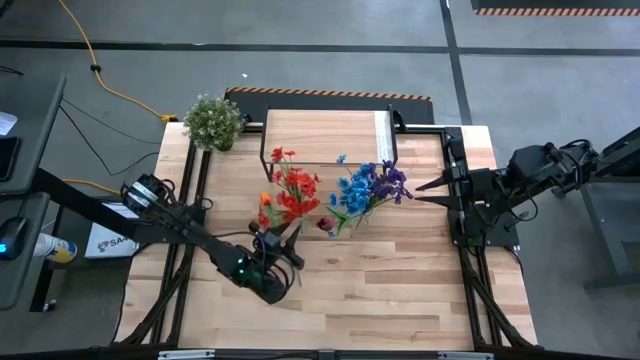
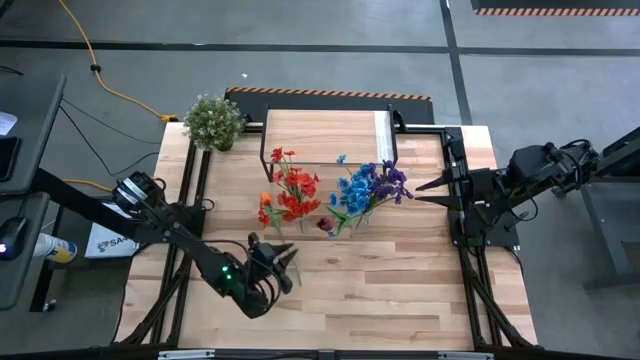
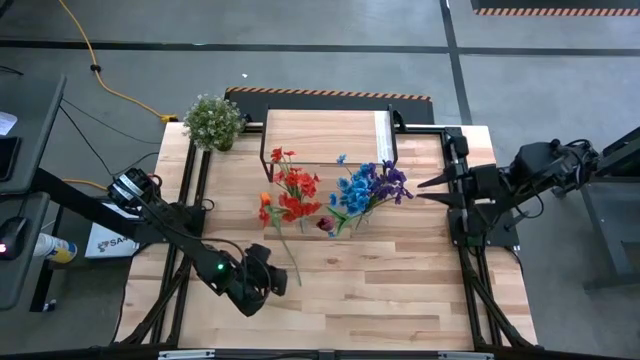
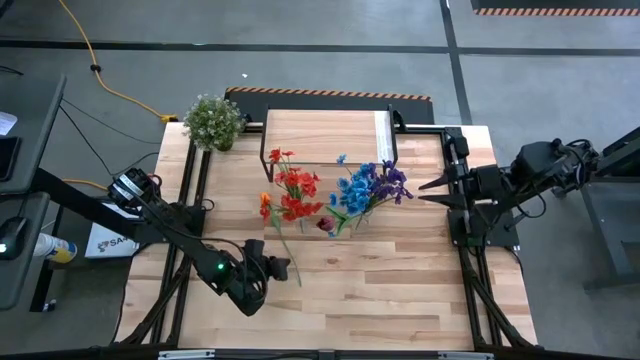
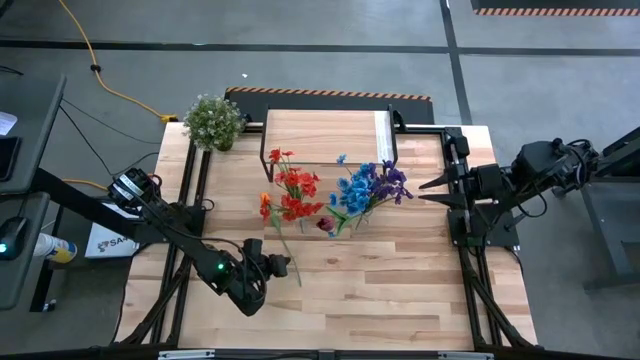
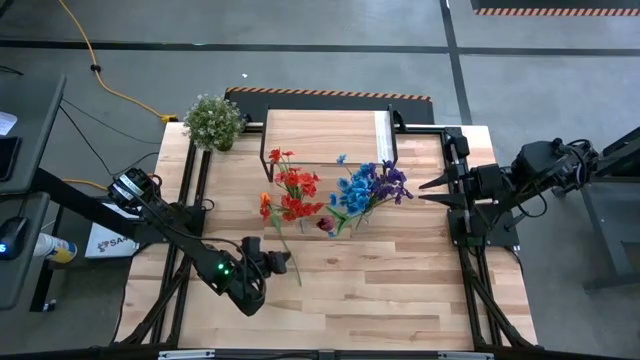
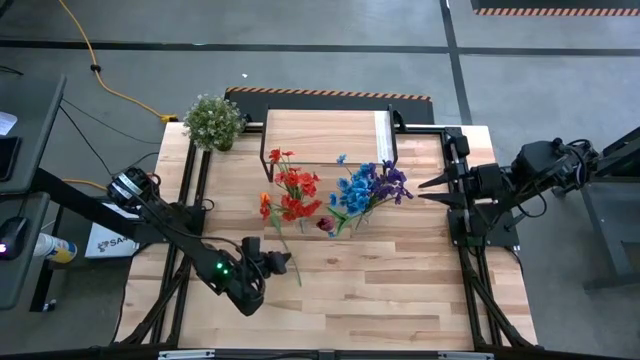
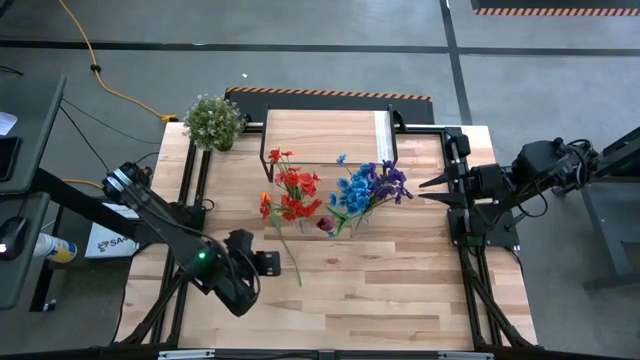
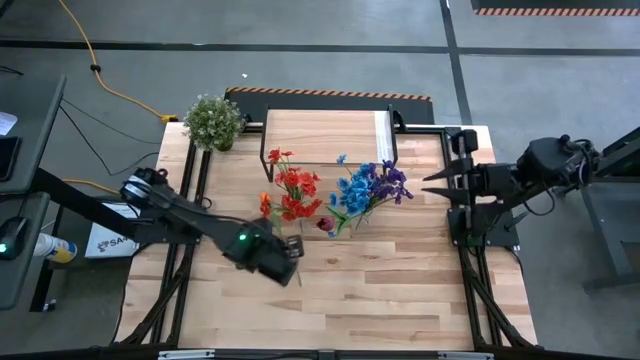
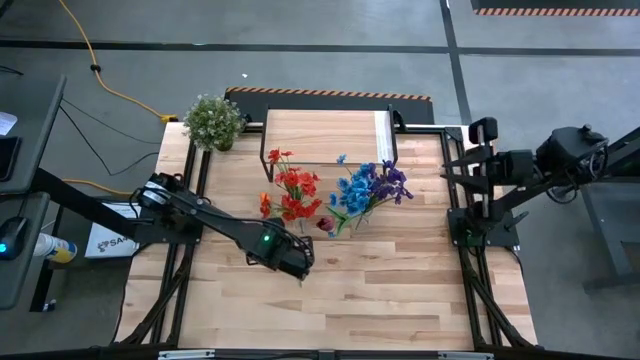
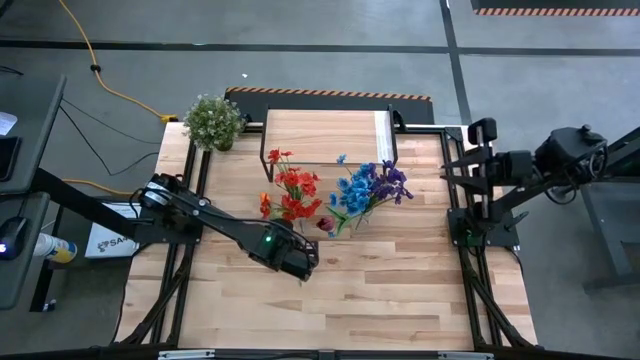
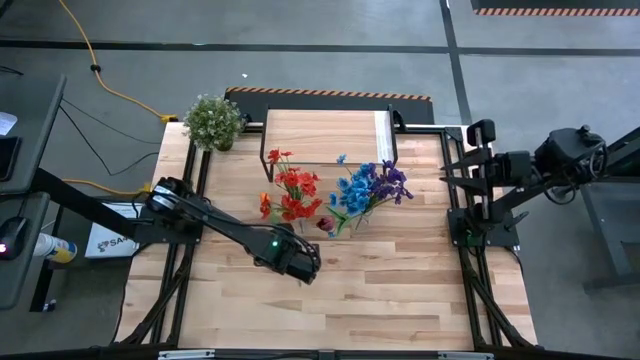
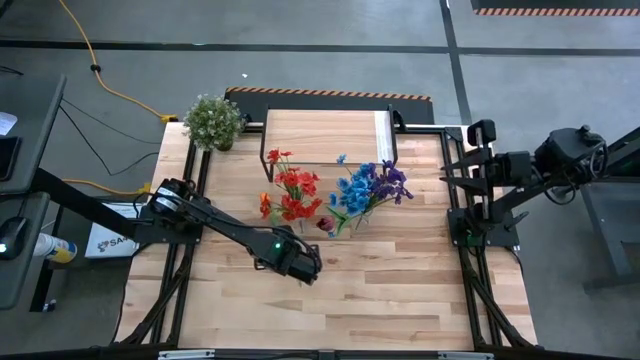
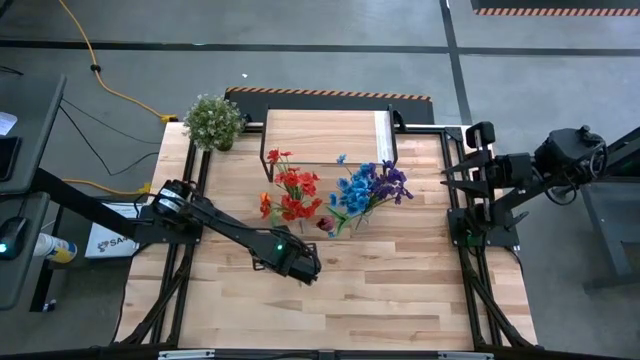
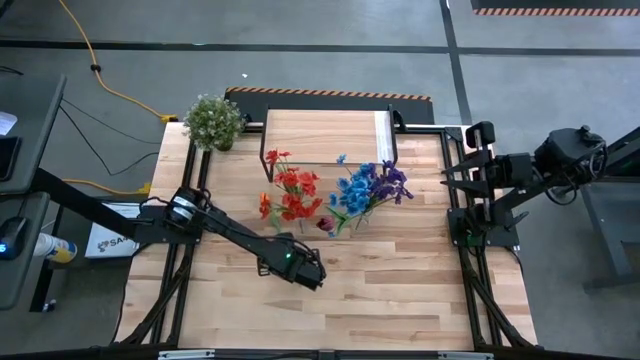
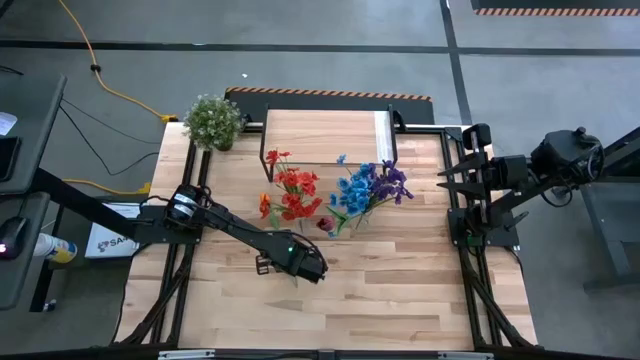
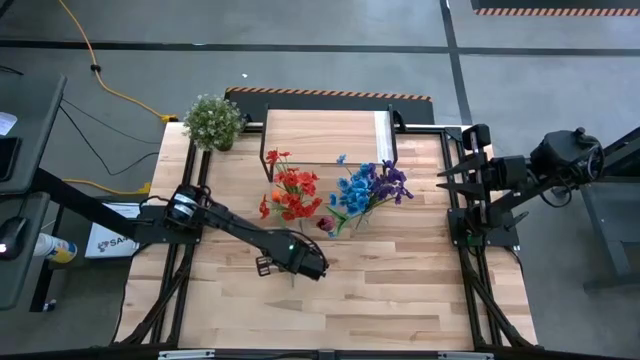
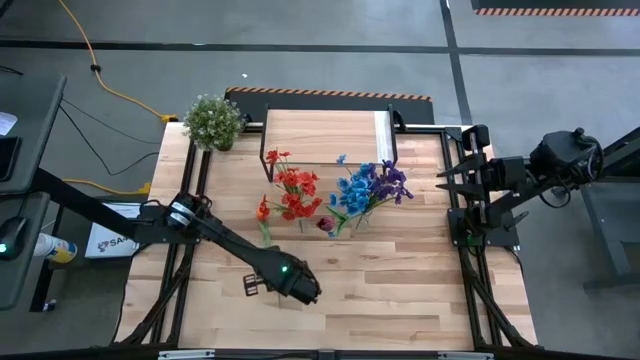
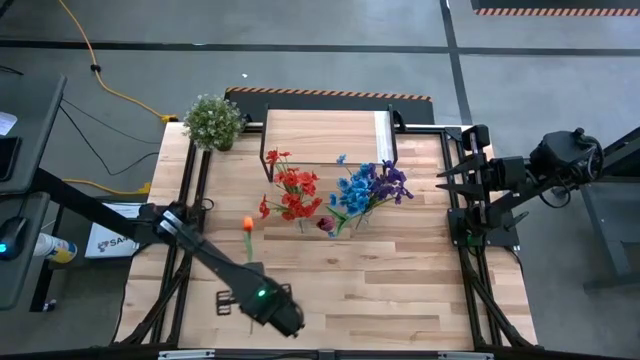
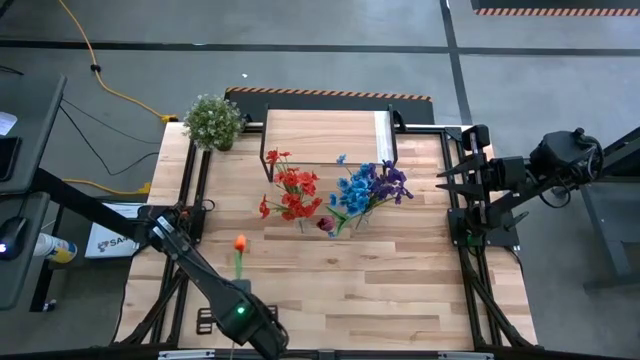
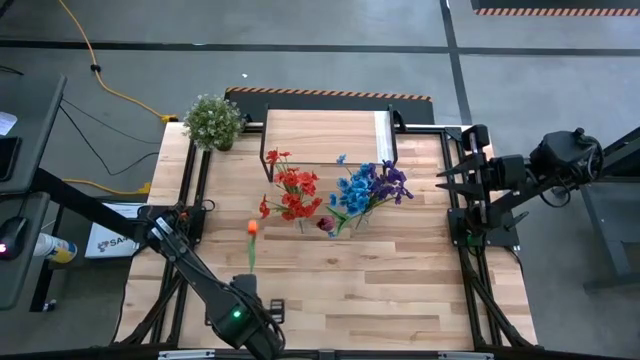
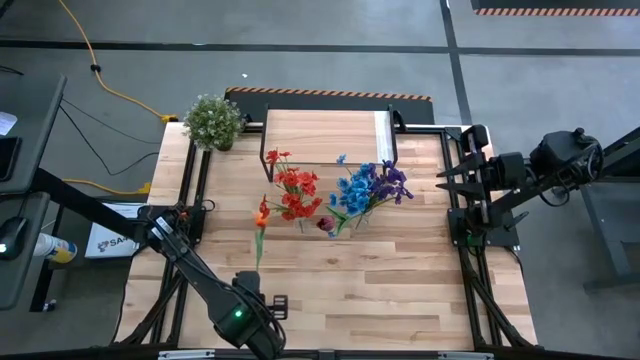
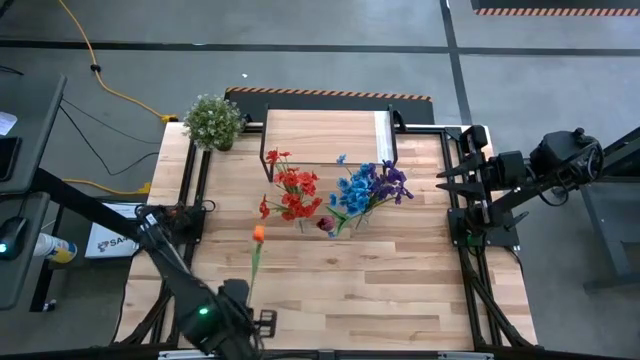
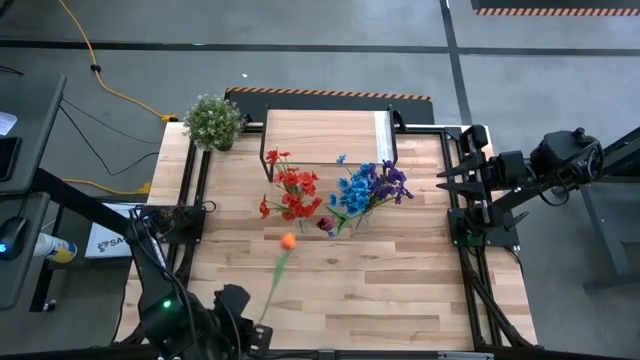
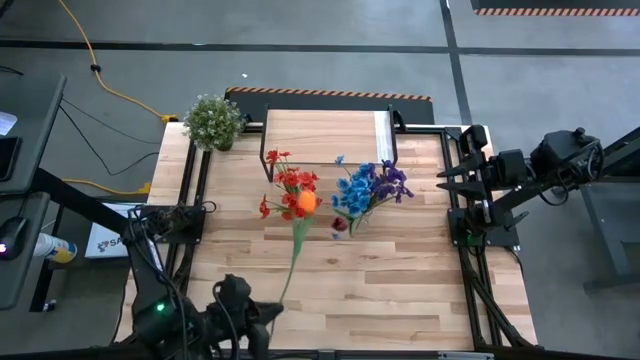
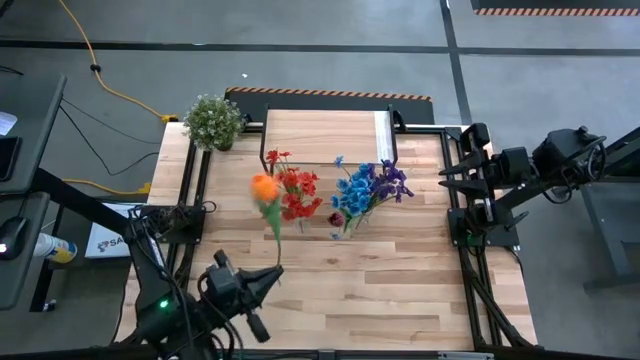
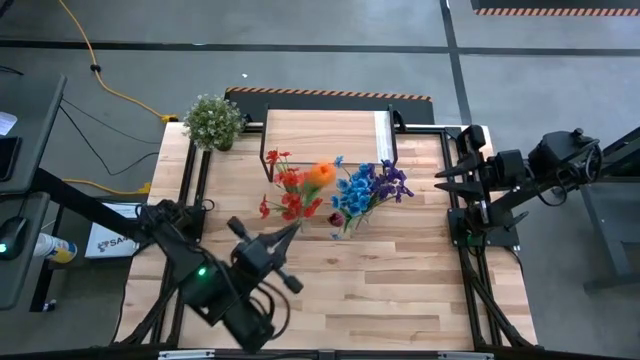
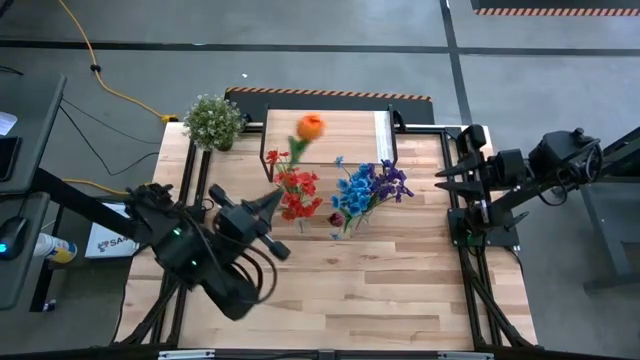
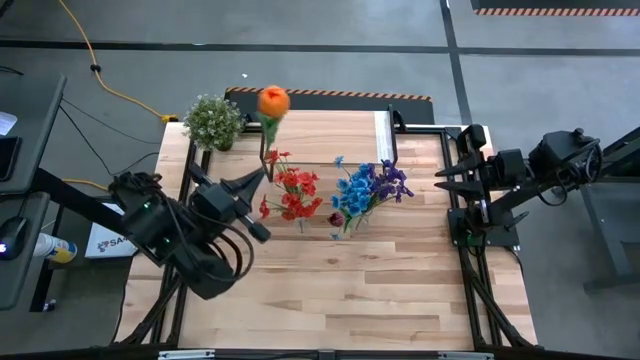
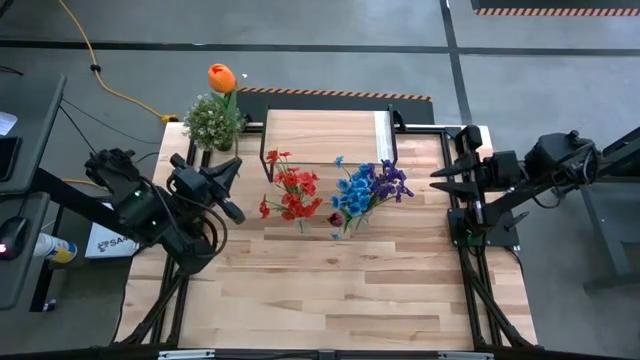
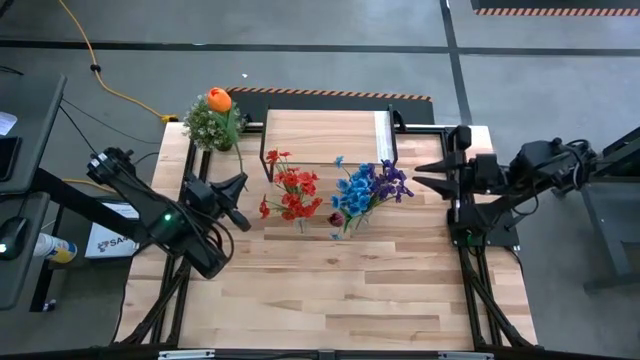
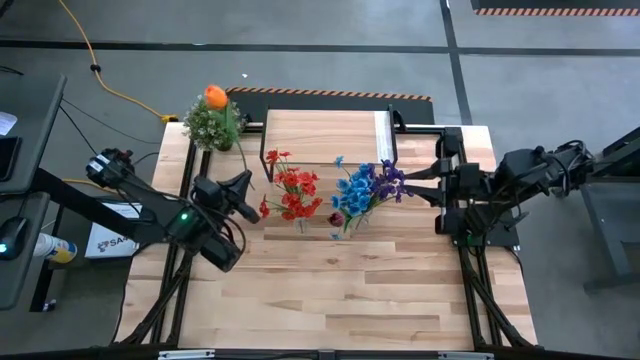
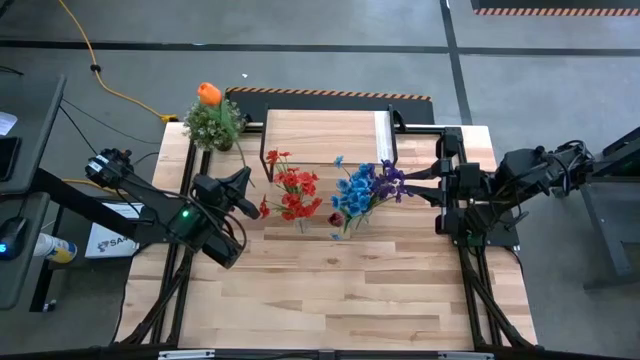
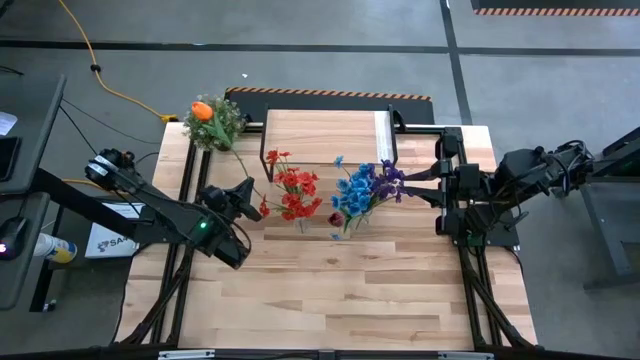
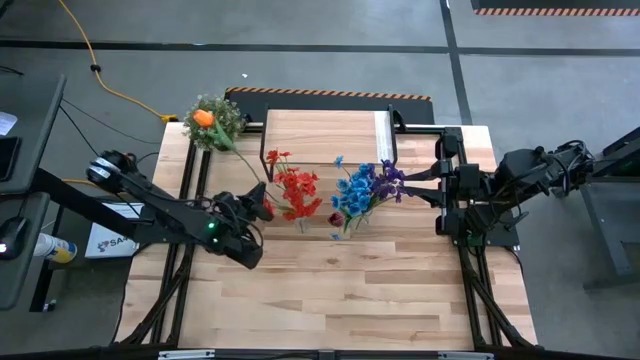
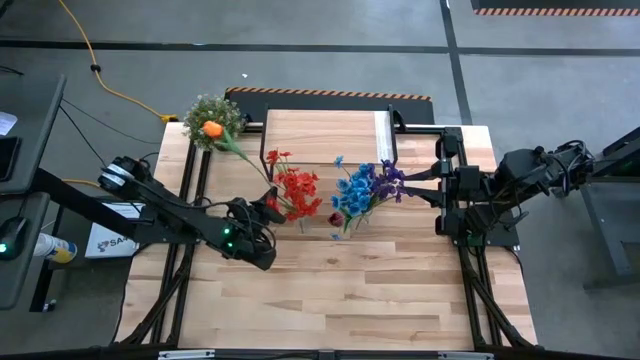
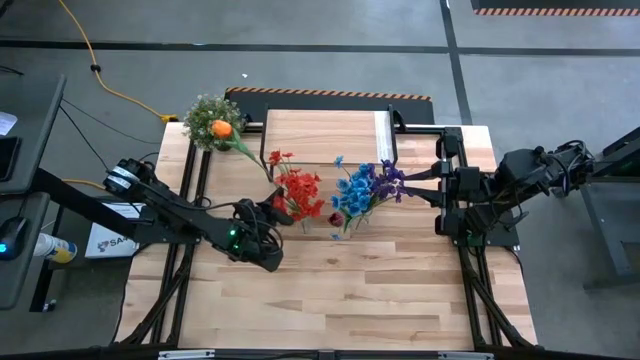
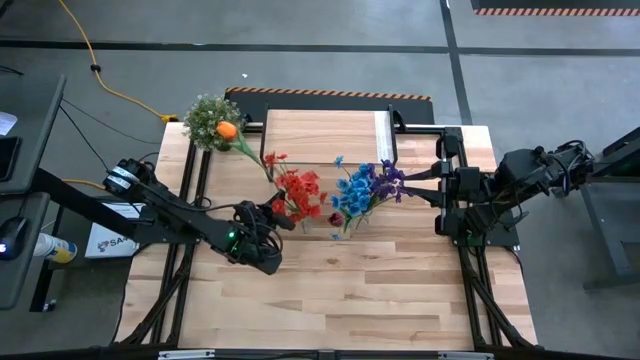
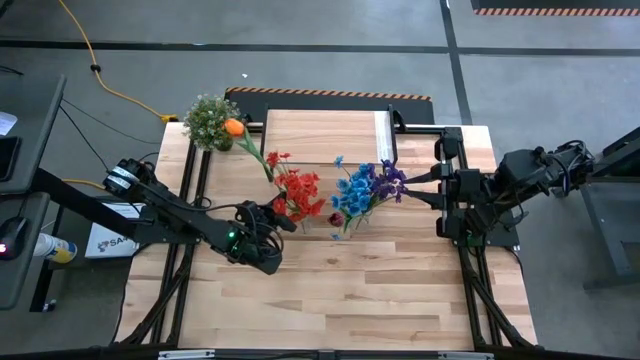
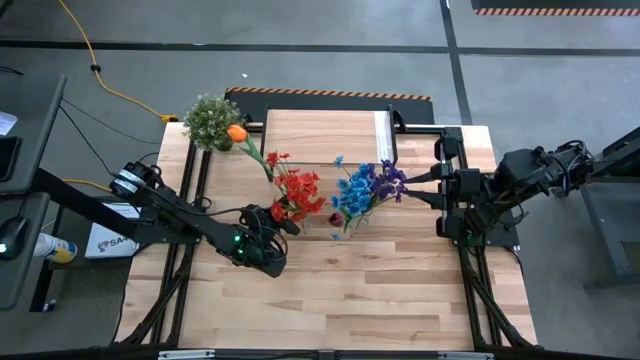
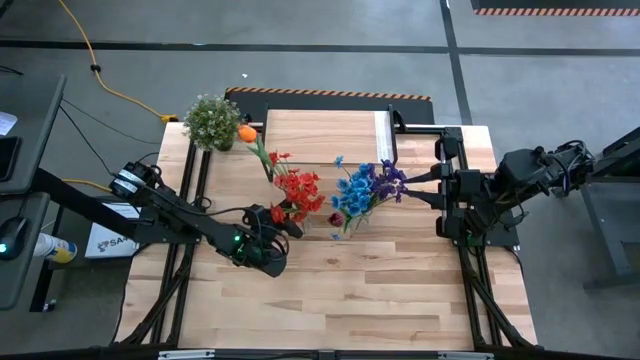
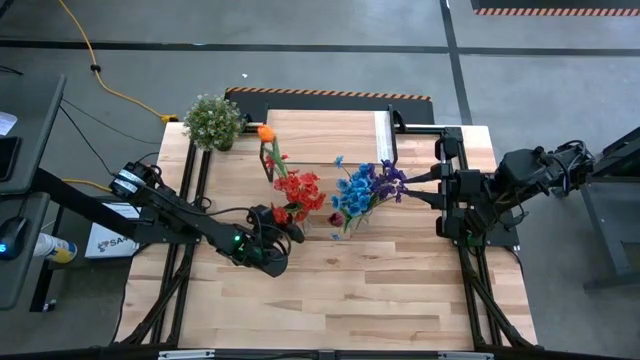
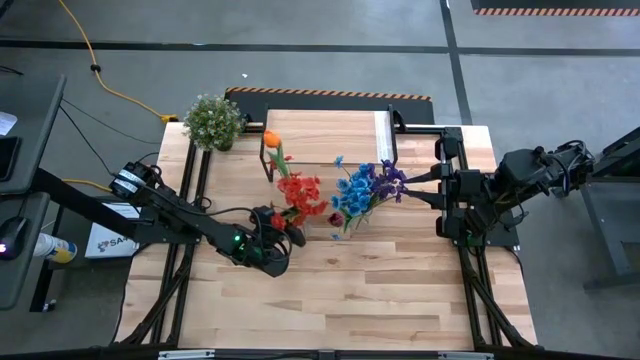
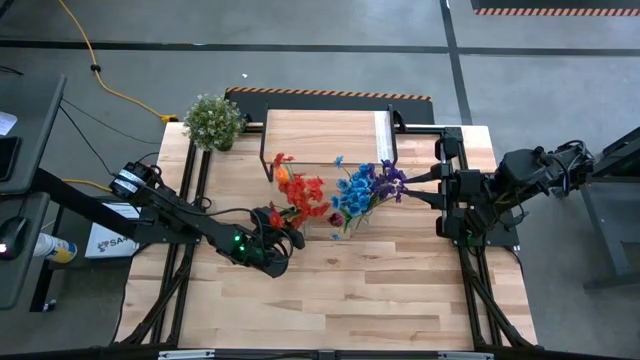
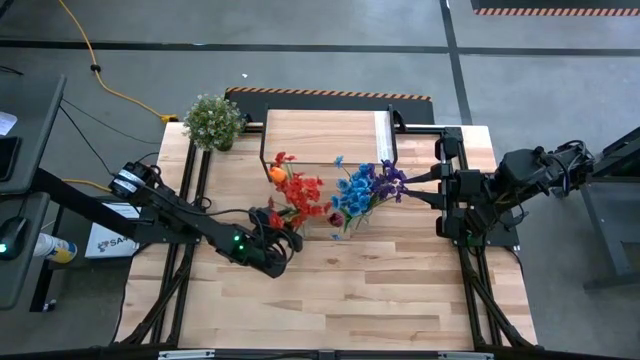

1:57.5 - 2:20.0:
Task: Pick and place flowers into a vace then onto a shelf
Put the orange flower into the left transparent vase
